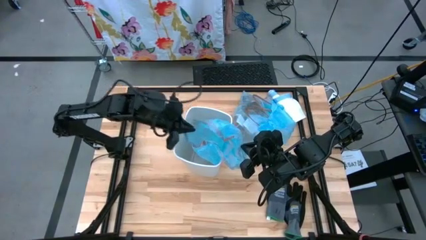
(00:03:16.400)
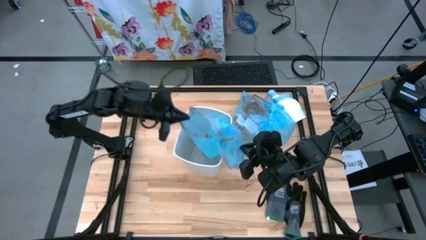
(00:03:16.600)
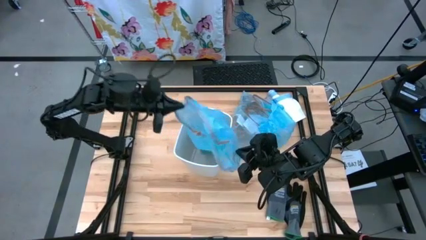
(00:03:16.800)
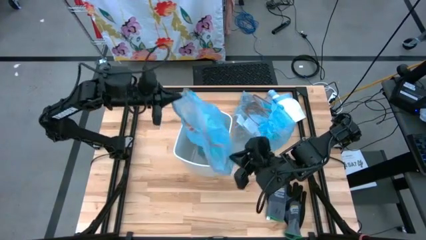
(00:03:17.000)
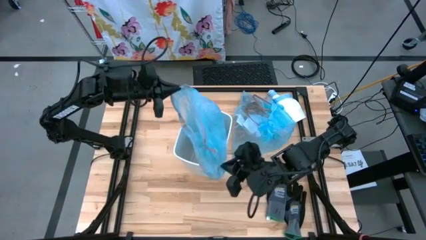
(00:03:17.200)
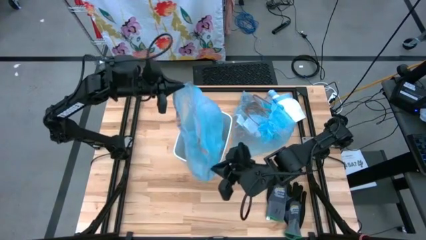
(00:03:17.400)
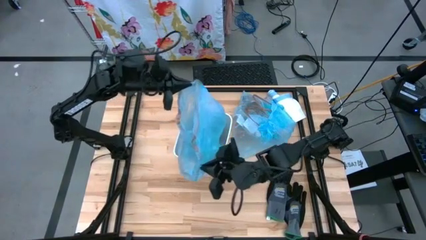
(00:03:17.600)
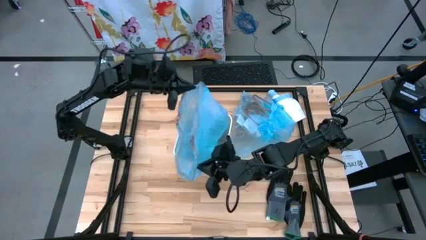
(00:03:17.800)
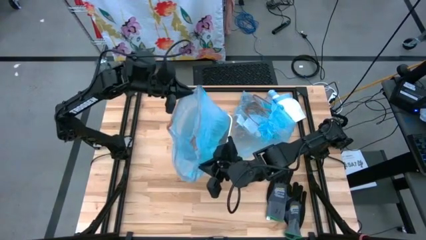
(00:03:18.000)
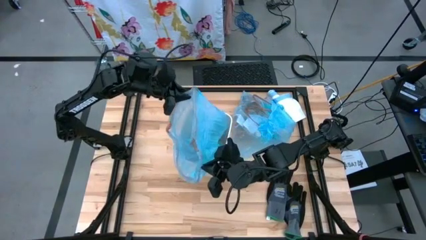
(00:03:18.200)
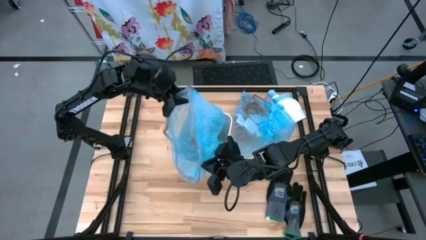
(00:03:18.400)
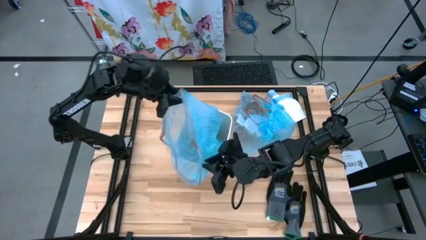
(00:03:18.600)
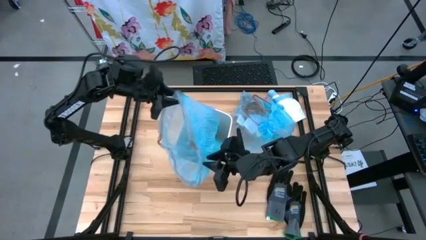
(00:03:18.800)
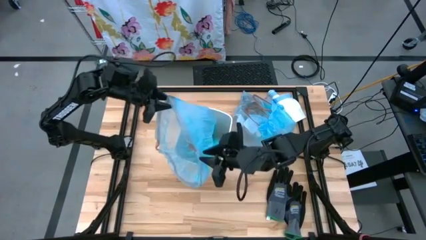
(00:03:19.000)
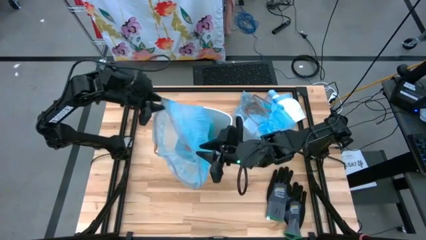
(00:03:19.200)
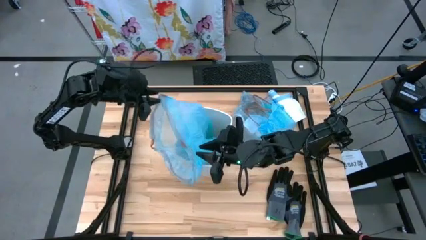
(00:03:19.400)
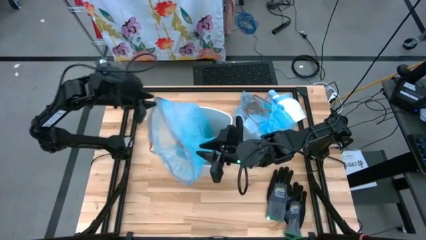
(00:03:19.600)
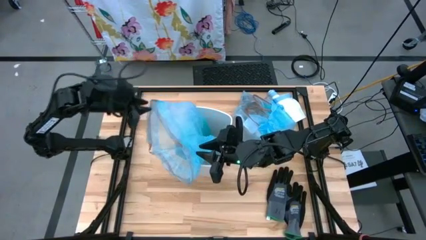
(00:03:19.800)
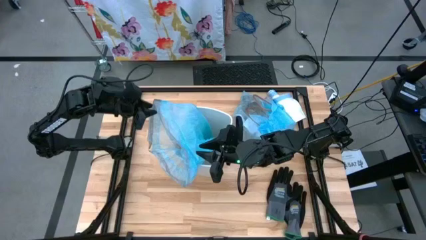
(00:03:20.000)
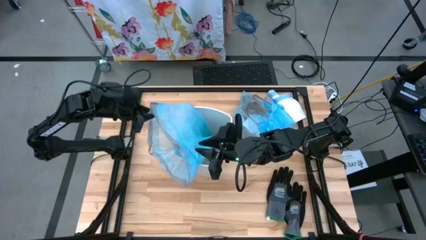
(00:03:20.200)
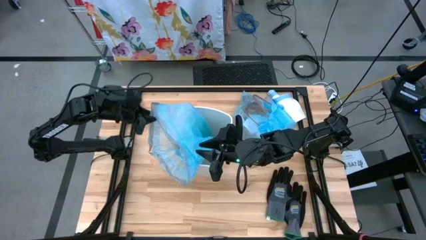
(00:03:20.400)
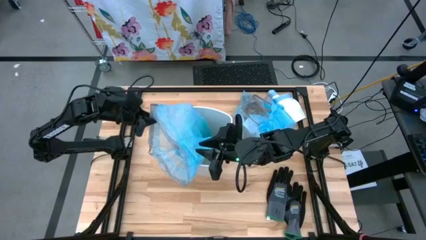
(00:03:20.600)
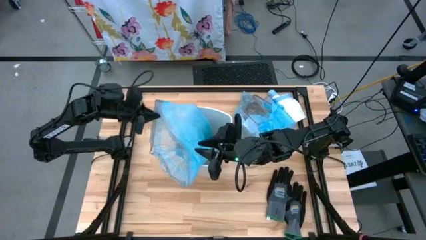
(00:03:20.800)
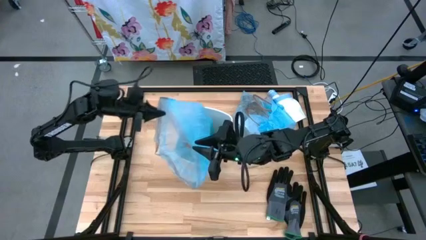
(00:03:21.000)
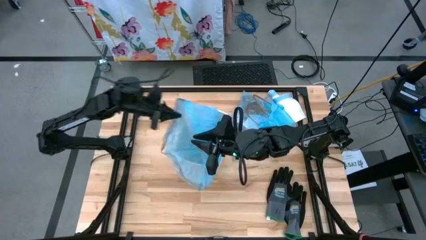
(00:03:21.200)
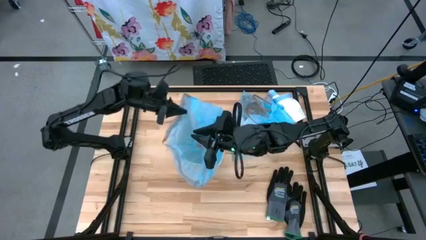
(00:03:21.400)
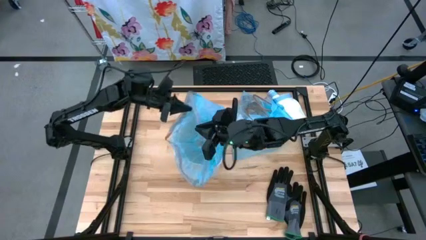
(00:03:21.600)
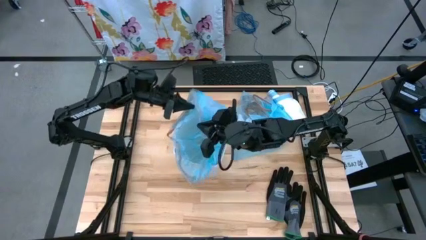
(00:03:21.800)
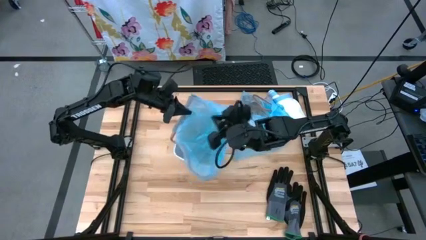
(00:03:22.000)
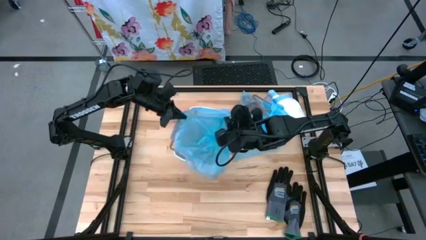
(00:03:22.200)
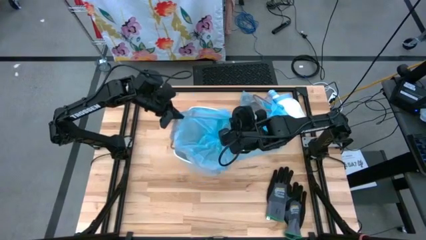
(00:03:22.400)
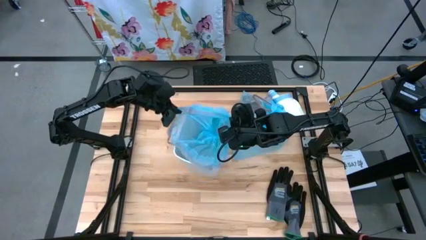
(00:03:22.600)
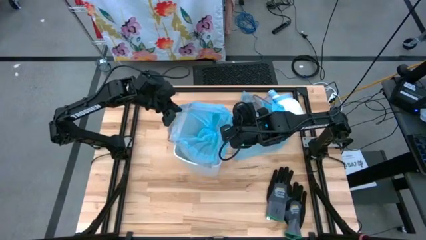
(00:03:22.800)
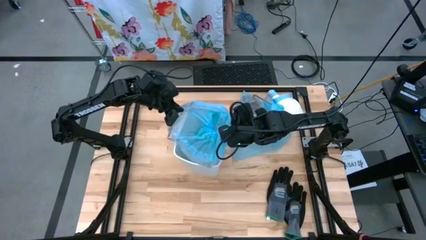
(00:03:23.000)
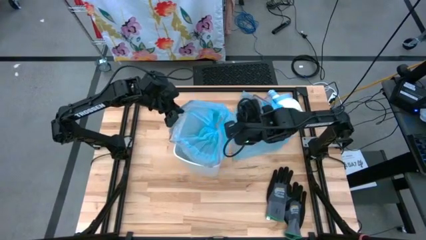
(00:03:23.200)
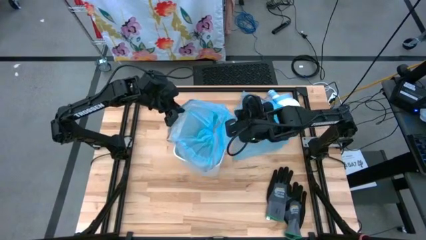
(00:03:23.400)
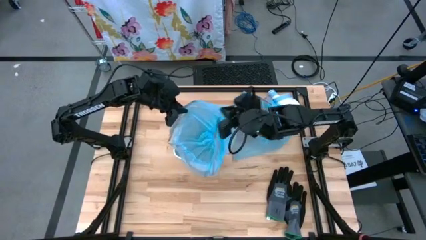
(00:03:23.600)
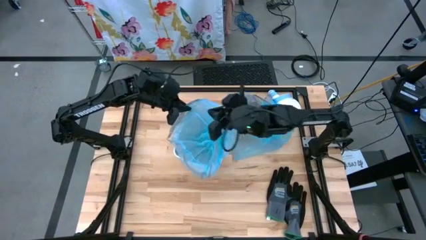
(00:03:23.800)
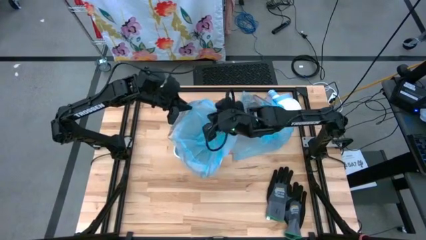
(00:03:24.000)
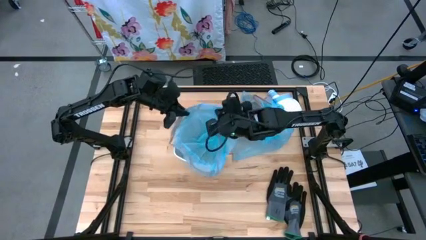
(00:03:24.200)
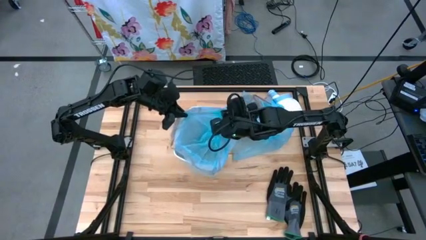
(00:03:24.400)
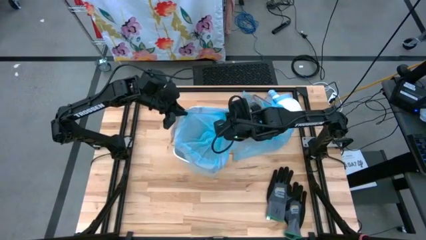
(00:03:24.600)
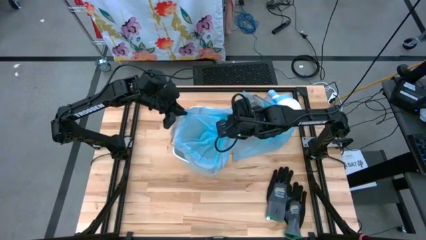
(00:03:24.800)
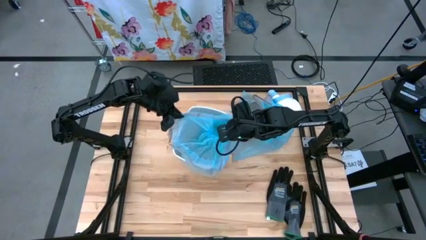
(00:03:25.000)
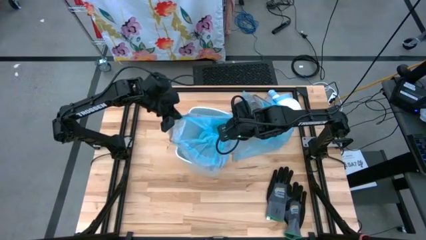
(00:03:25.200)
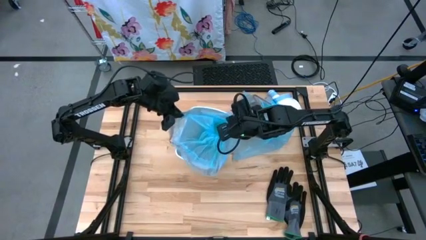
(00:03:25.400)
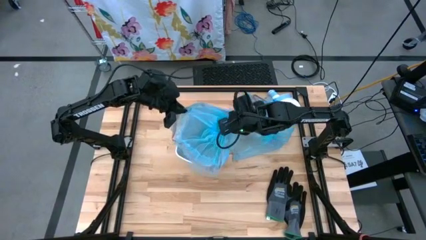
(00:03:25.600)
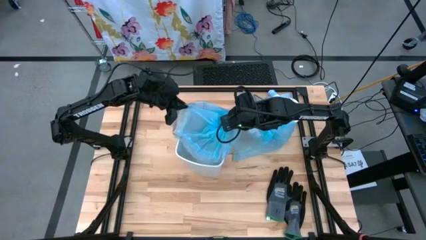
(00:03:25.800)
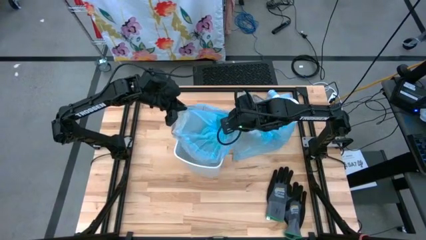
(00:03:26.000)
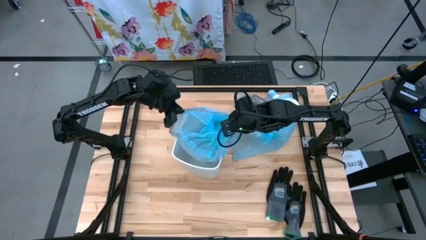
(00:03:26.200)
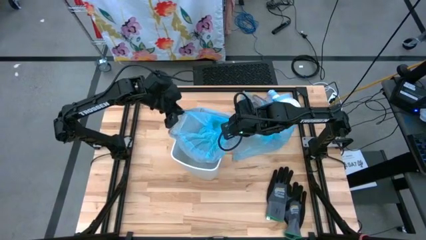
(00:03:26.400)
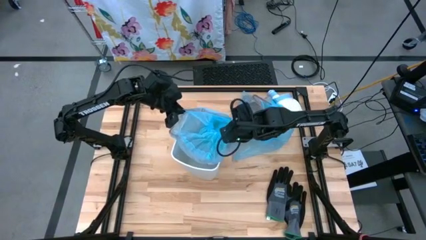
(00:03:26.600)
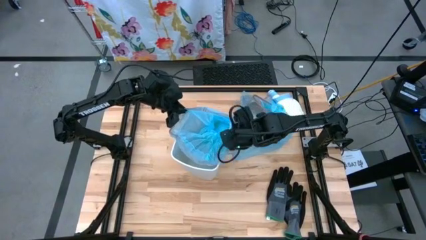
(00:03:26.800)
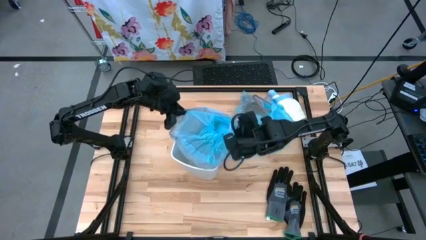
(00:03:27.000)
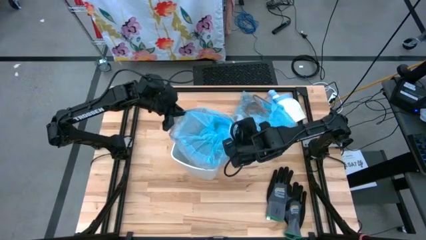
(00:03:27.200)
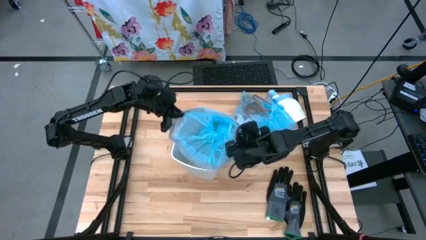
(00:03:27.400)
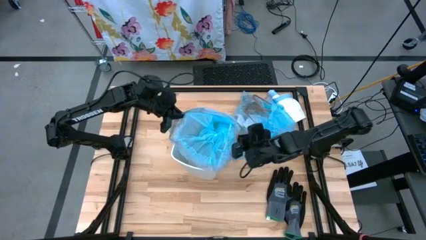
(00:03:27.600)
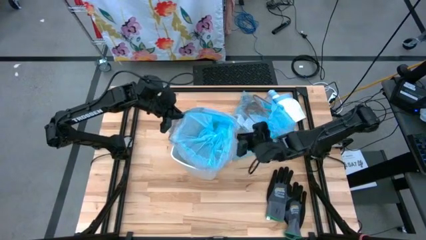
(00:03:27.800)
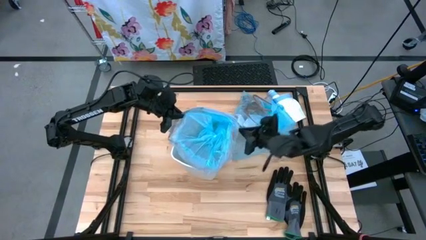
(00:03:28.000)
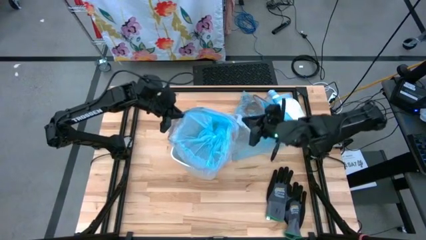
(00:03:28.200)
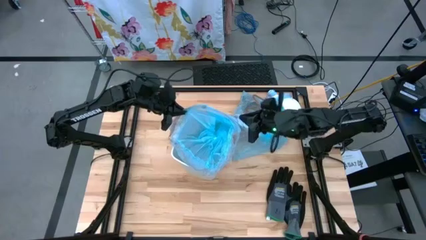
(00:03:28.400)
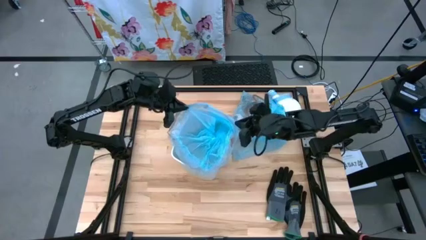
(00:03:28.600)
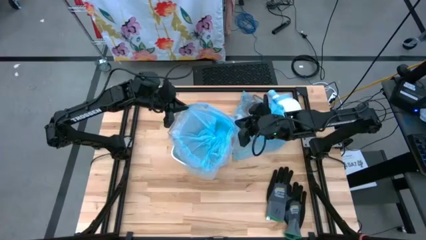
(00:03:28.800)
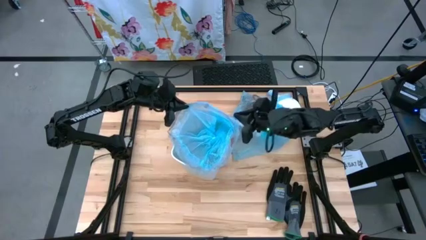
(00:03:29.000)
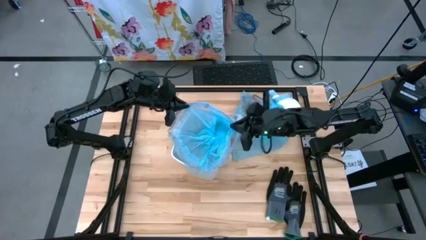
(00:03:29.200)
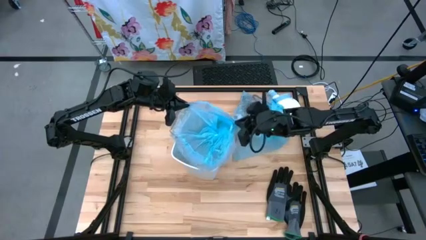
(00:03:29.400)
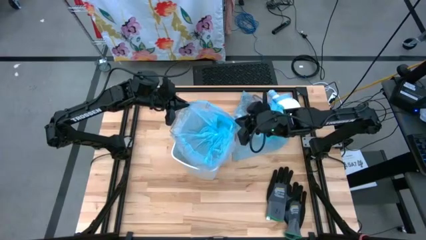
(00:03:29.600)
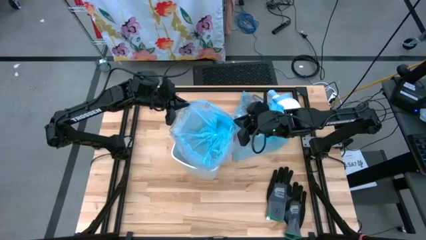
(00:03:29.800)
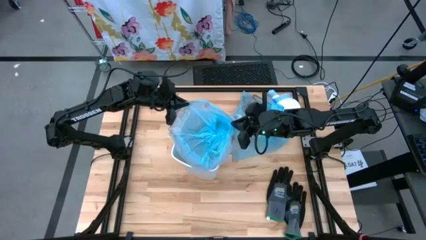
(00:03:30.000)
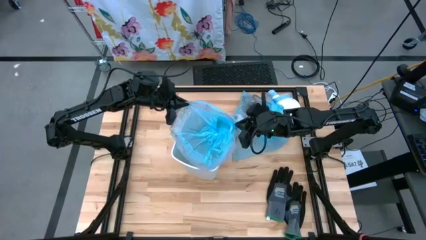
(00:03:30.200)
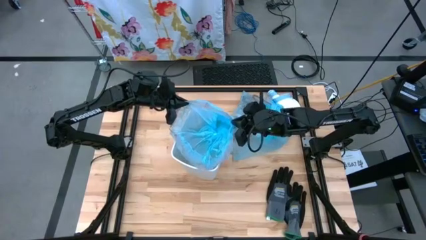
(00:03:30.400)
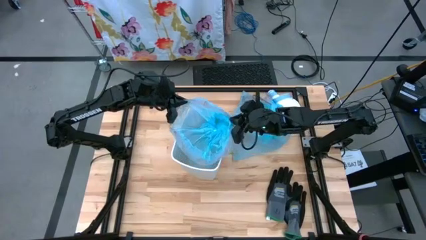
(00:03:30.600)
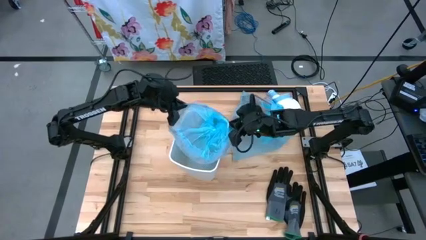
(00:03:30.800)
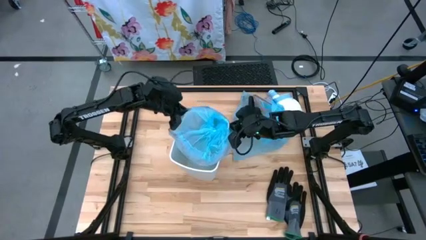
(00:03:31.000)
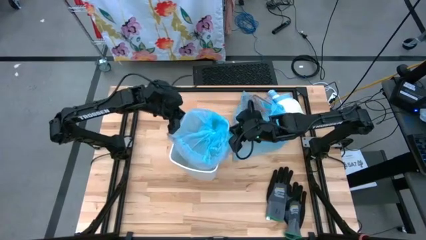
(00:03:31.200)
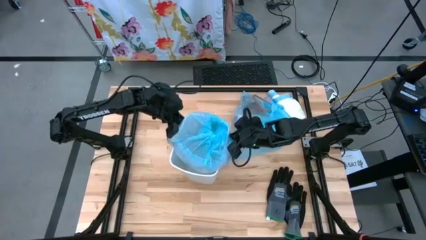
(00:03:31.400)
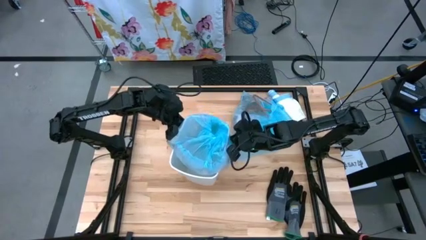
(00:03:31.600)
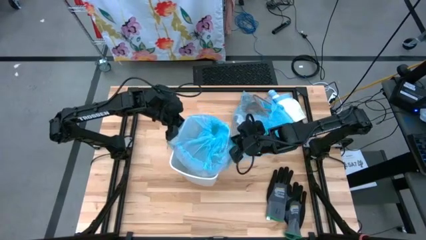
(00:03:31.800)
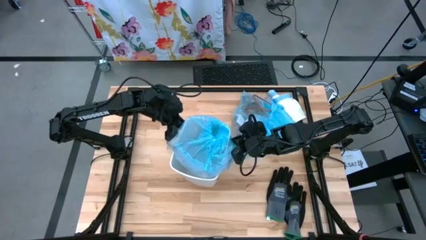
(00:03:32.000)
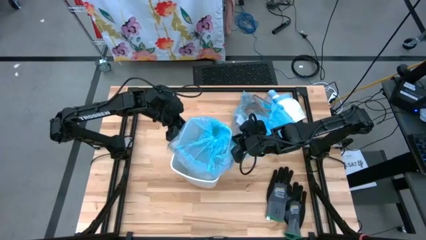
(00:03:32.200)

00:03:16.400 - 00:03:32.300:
Task: place trash/remove bag and relplace
Insert the new blue trash bag into the white trash bin
